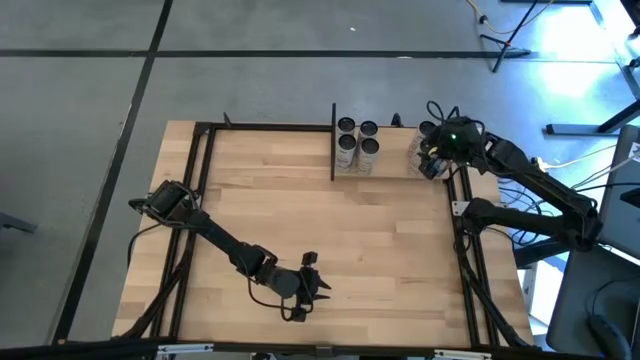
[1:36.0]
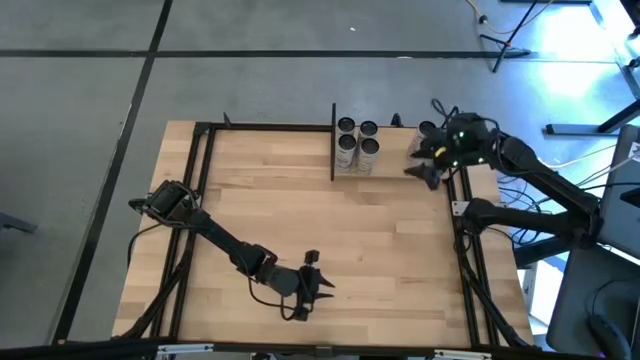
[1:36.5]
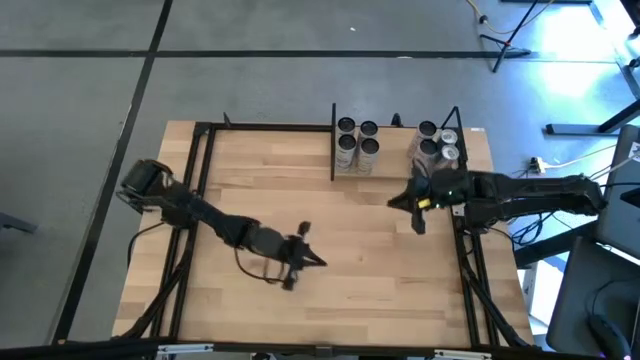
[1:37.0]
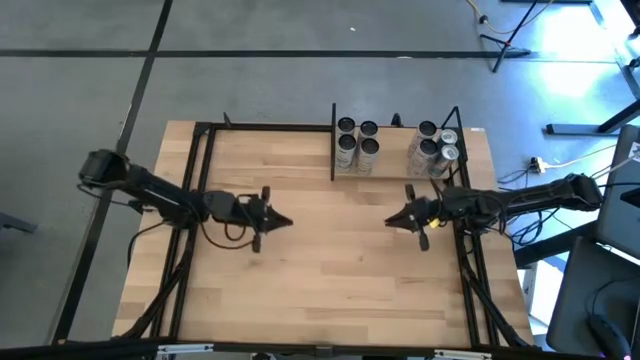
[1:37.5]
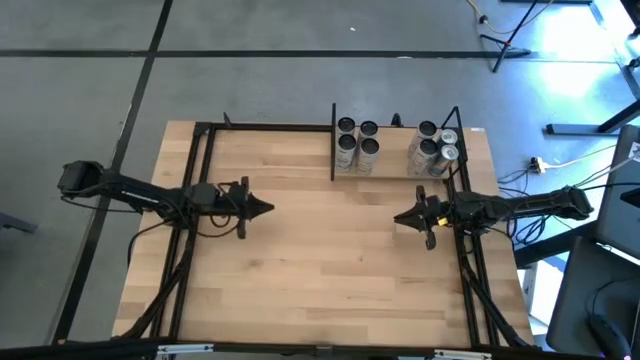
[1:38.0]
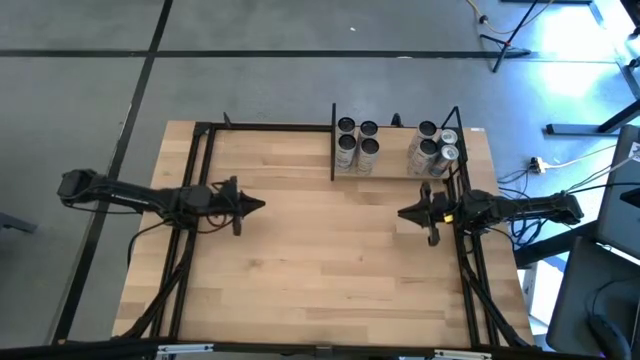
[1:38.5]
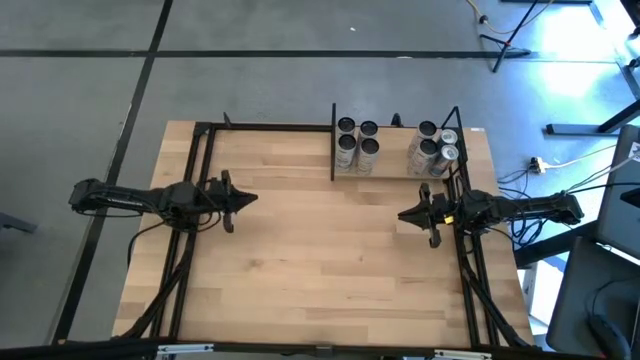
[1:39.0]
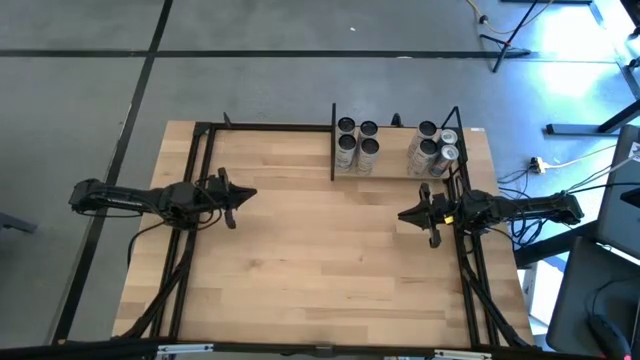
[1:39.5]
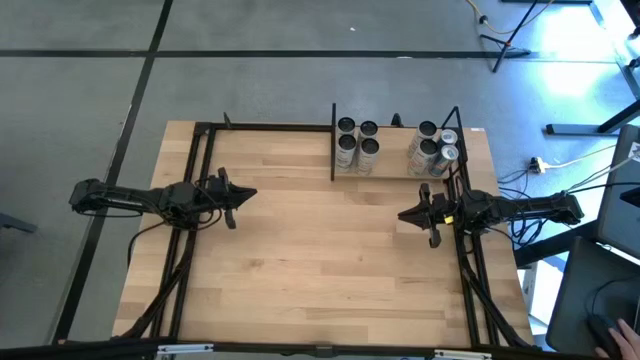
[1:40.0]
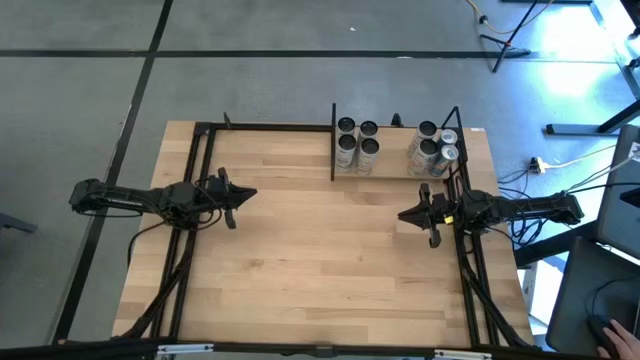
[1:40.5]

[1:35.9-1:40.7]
Task: Place canned beverage on shelf
Return to Home Position

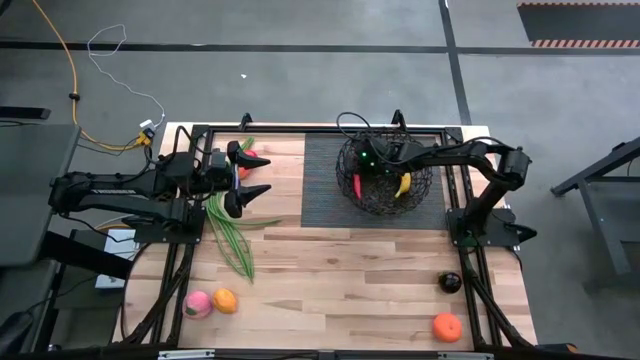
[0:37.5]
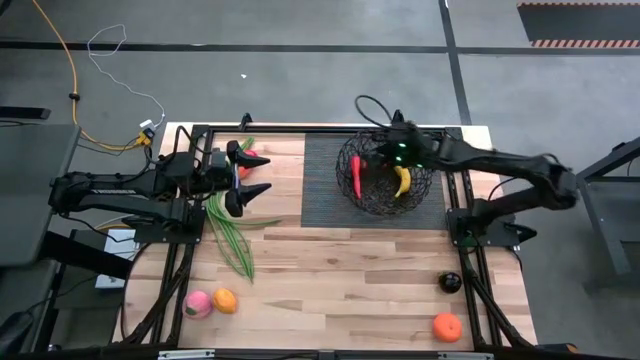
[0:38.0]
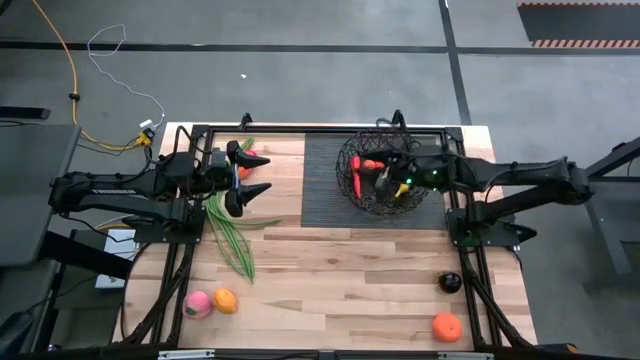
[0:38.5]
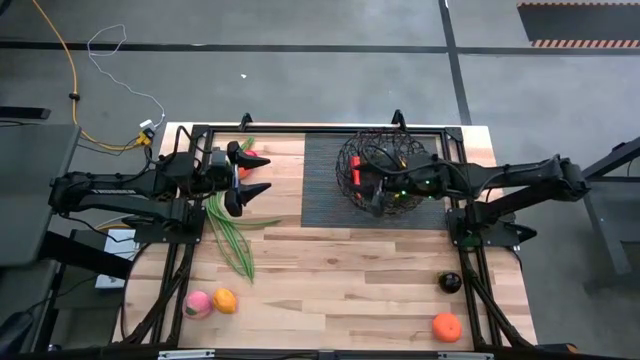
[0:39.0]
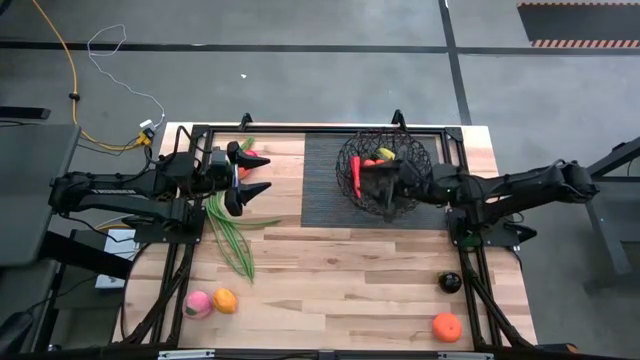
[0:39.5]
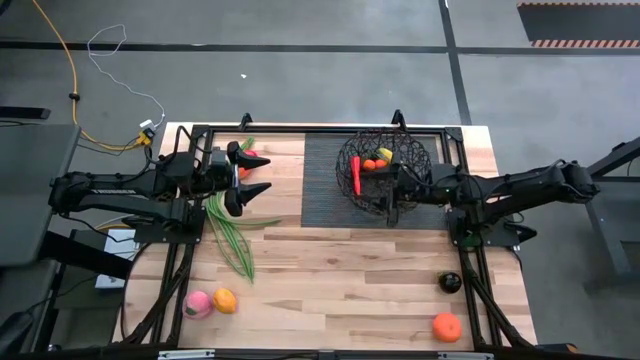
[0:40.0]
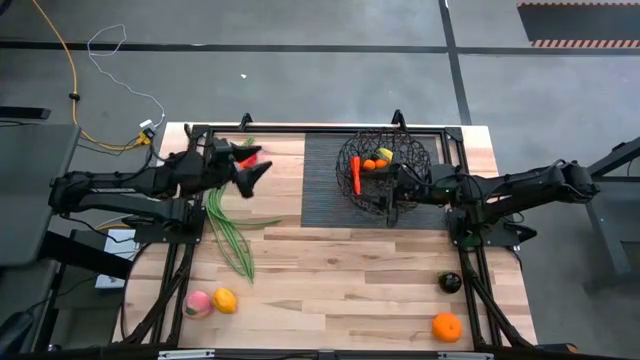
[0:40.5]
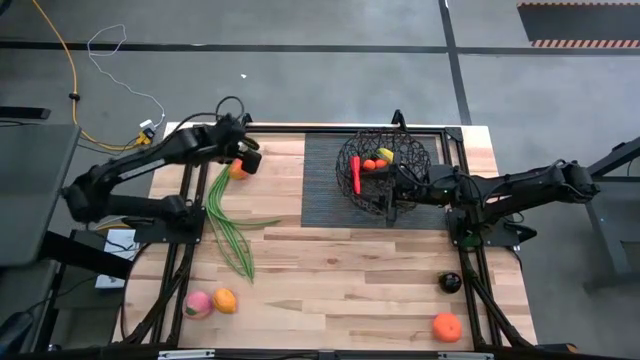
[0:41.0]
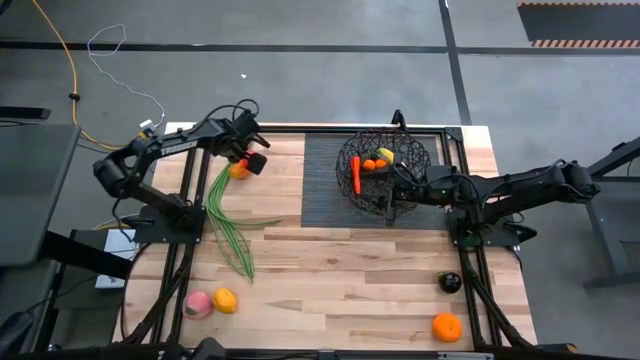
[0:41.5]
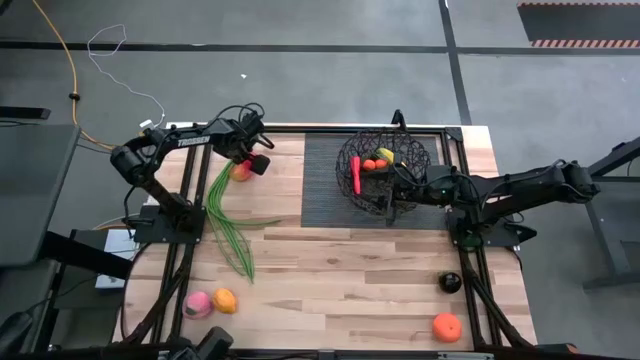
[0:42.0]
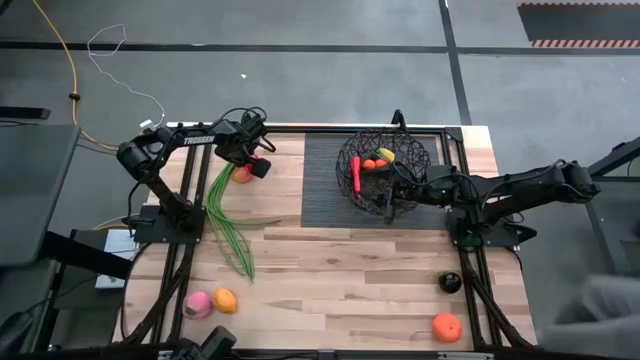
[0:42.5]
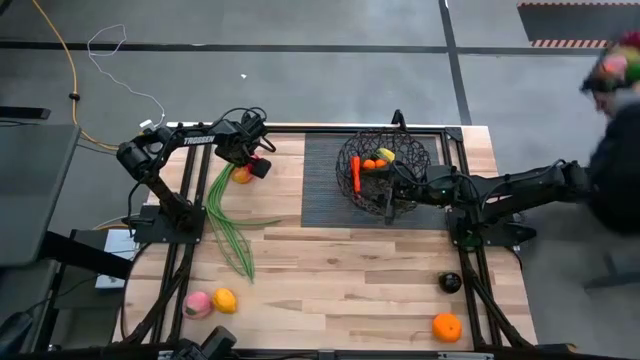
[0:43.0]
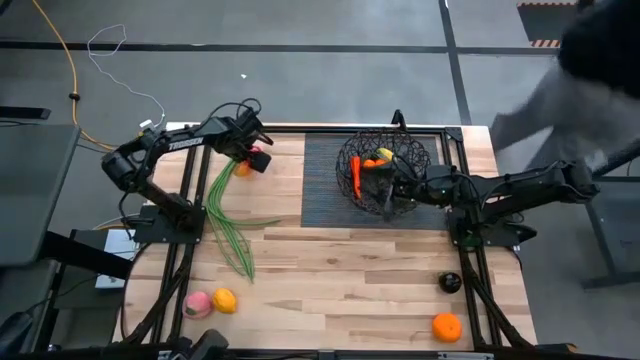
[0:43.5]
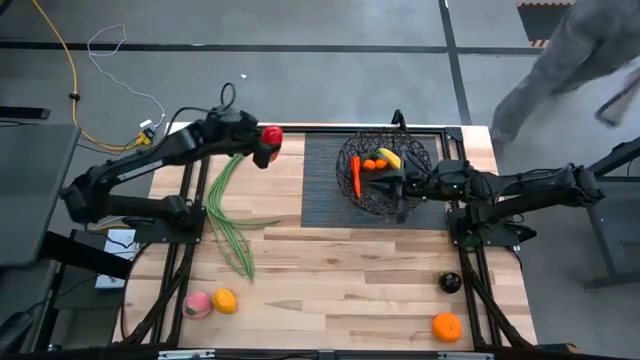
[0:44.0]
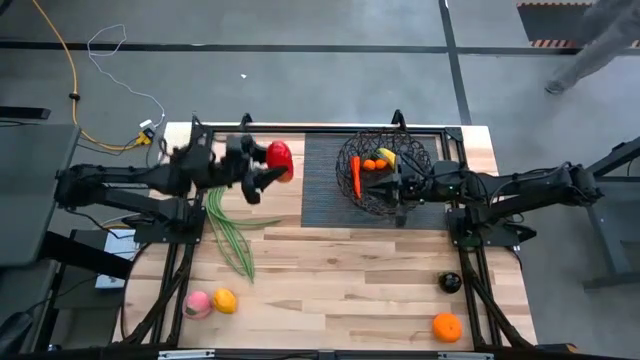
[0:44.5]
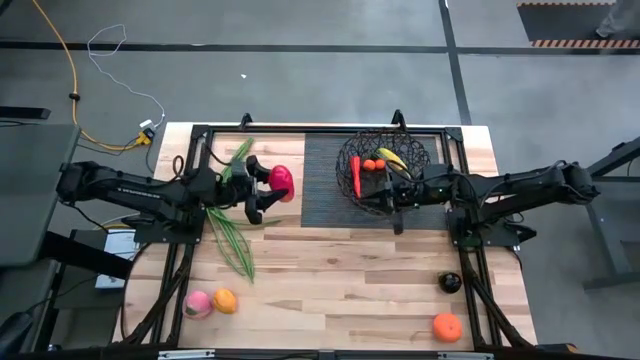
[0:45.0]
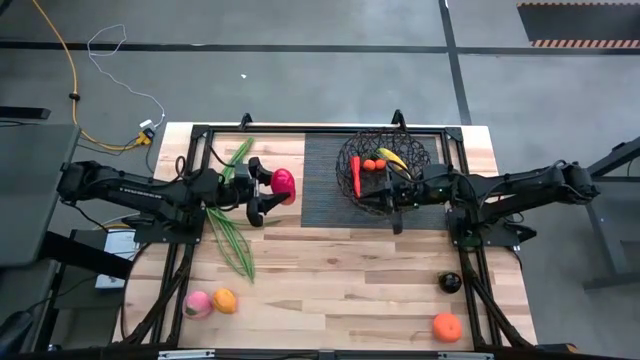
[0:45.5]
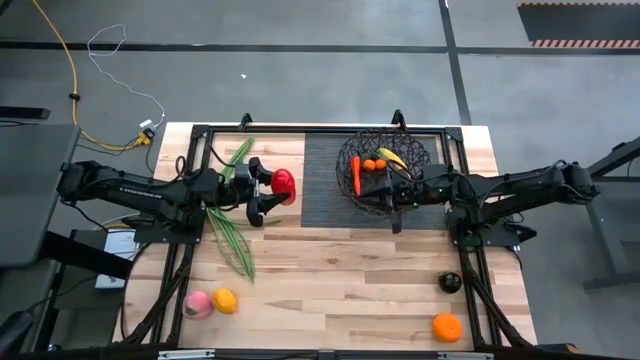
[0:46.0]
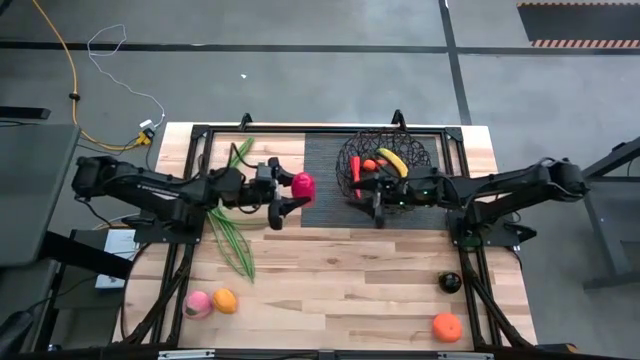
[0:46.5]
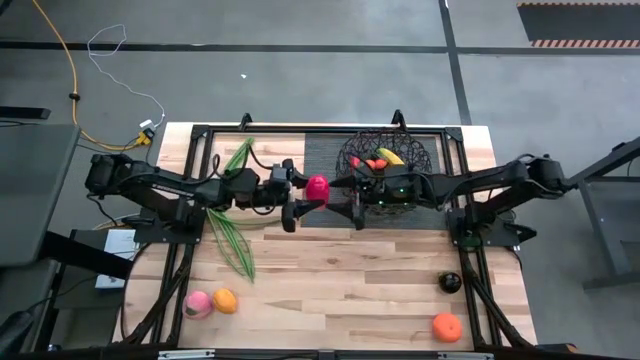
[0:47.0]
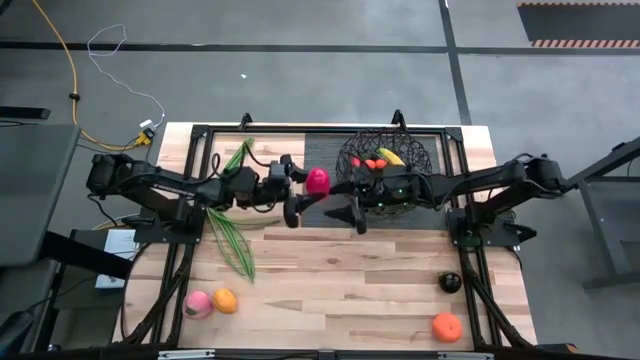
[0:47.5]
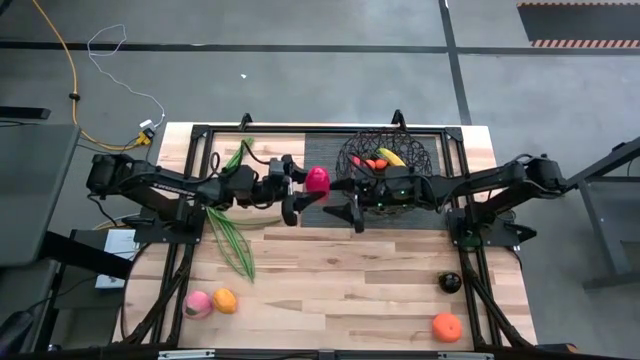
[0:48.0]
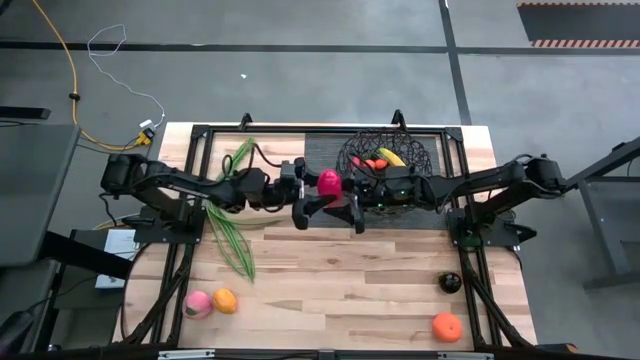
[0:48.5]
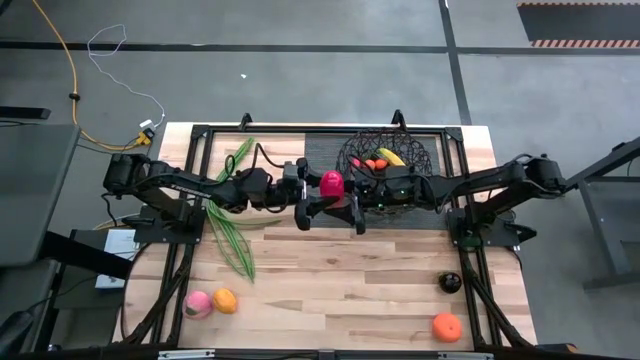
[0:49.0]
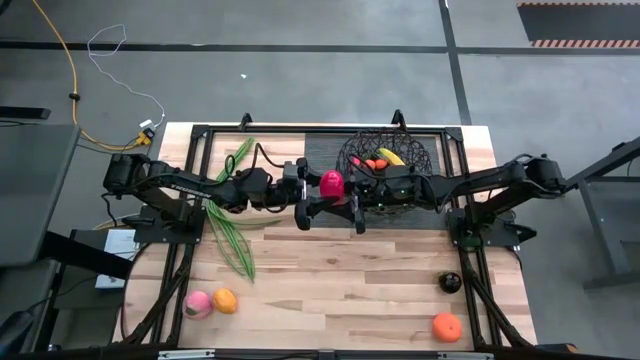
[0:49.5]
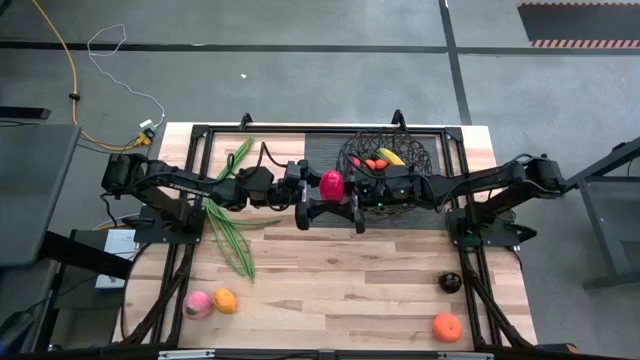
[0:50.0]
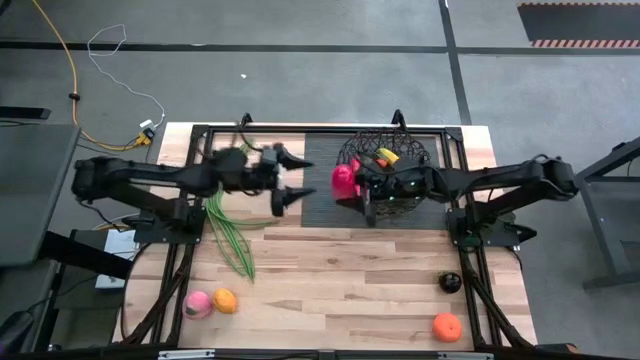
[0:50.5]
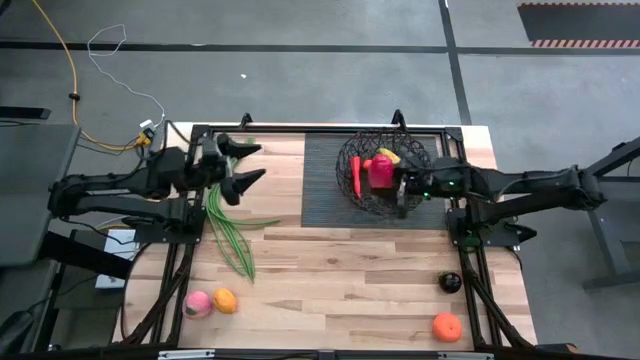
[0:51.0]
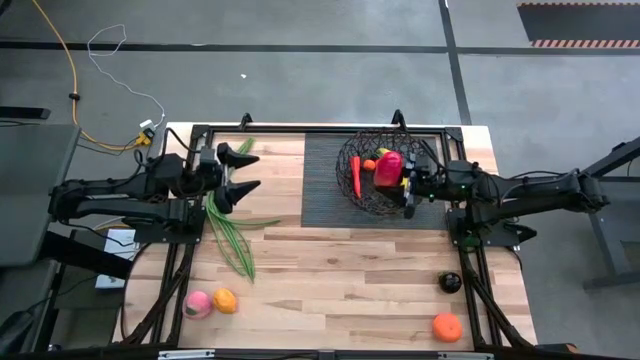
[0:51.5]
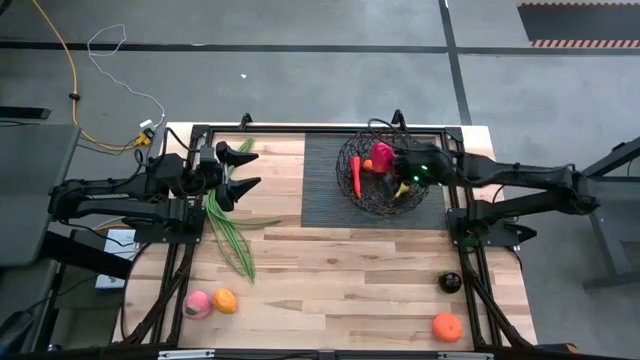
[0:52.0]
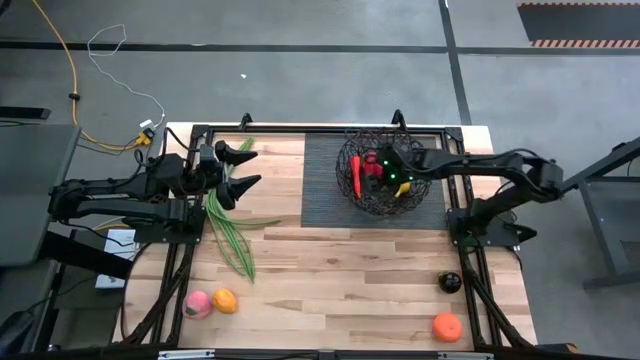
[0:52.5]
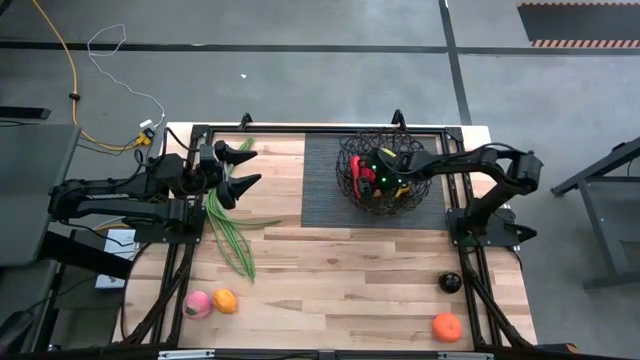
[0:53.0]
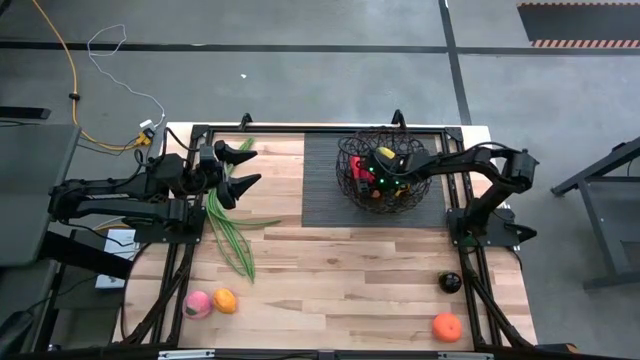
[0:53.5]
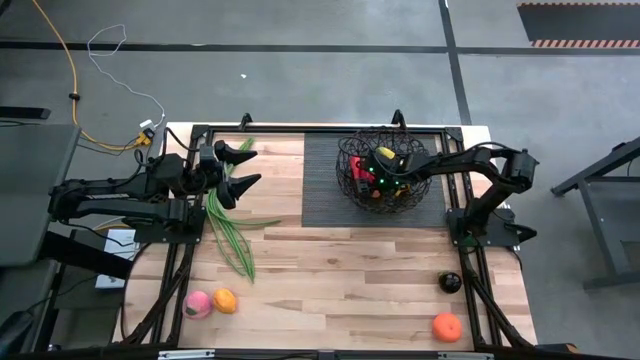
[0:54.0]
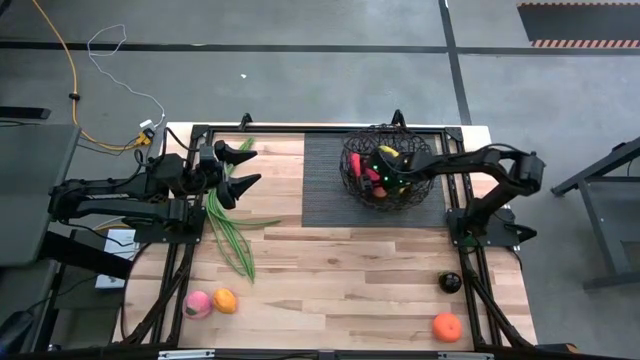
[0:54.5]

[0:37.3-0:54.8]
Task: Build produce basket
Put the red mango into the black basket
